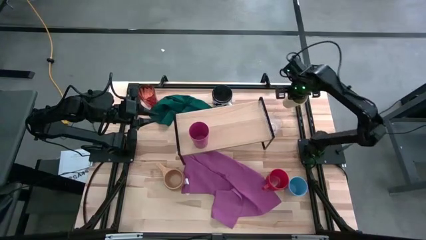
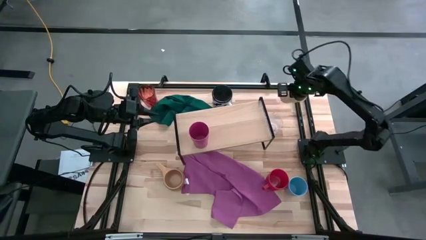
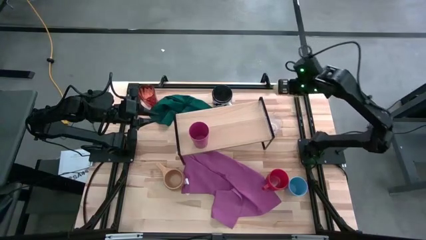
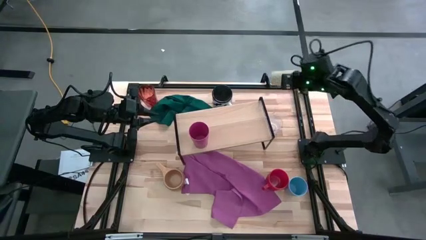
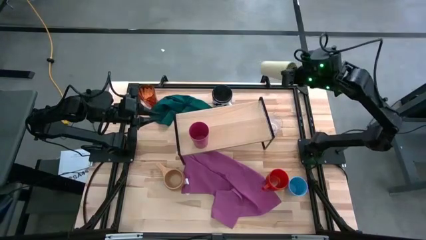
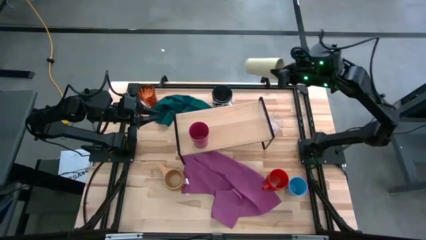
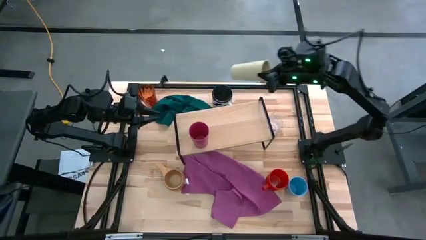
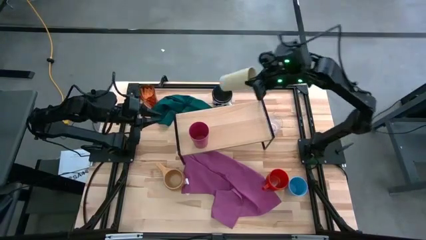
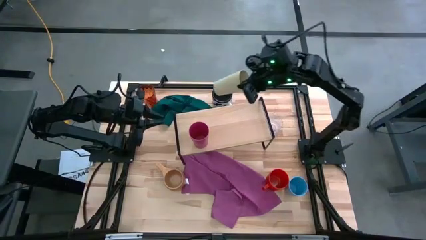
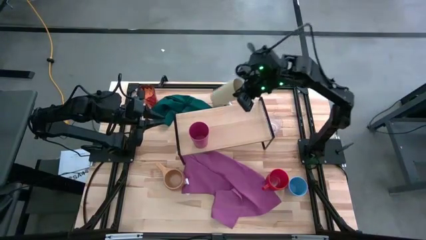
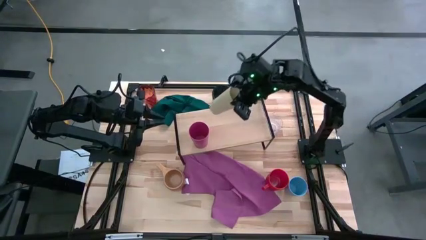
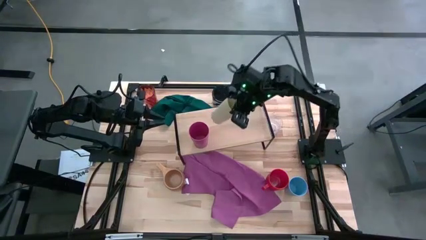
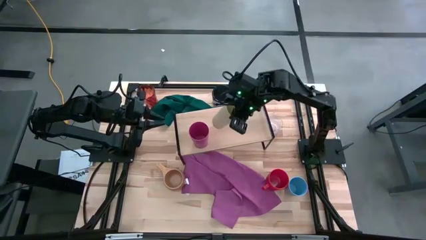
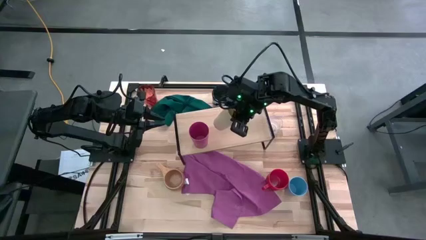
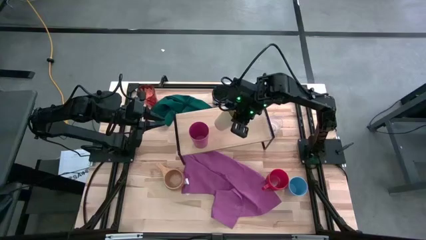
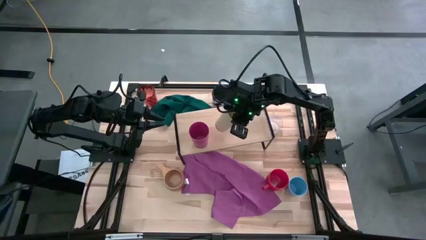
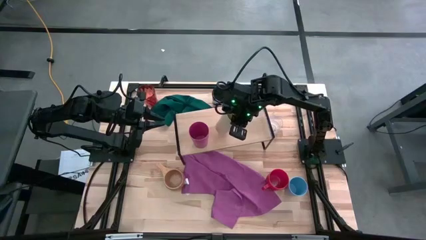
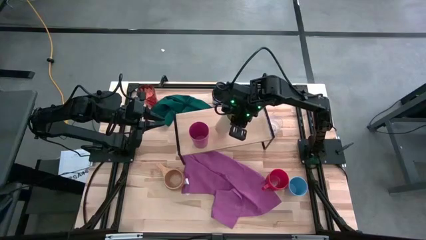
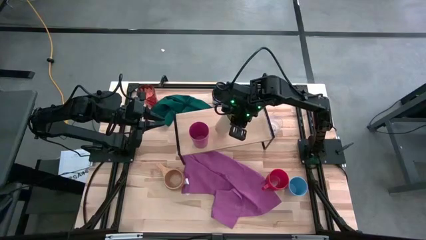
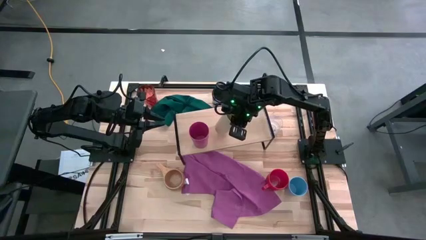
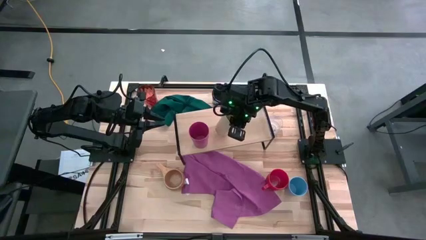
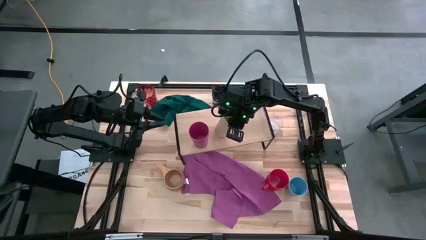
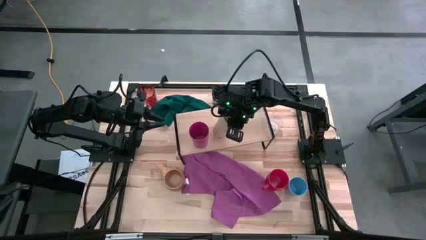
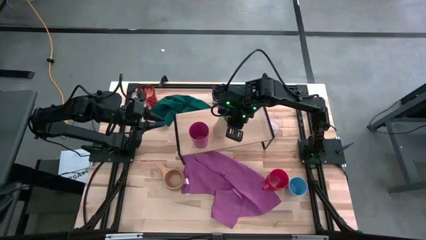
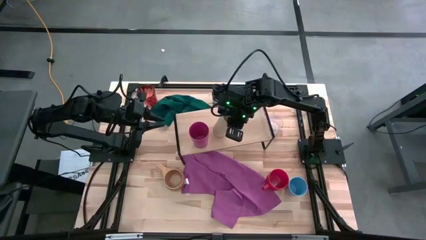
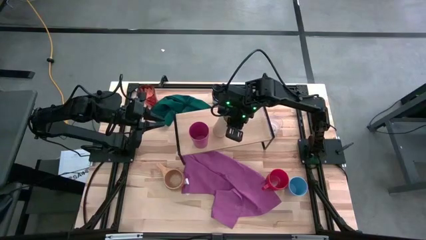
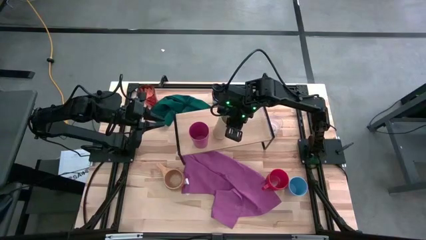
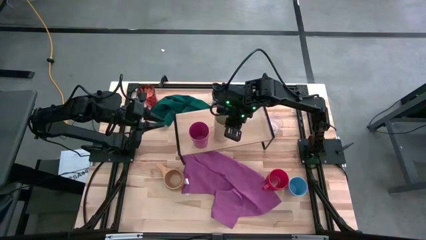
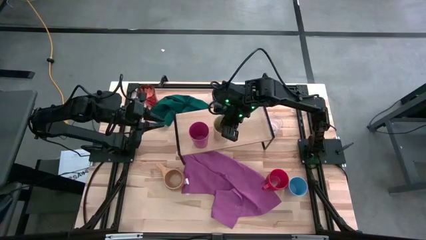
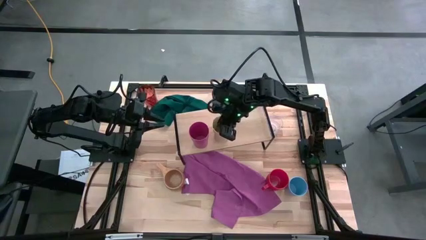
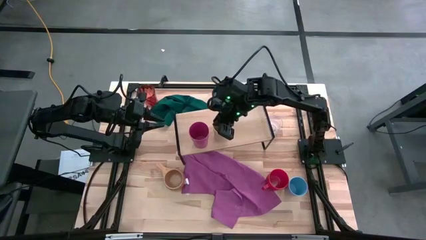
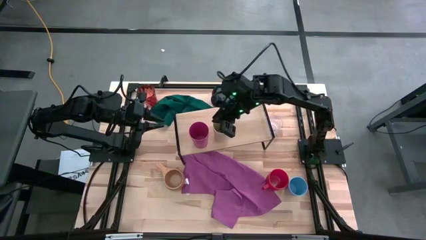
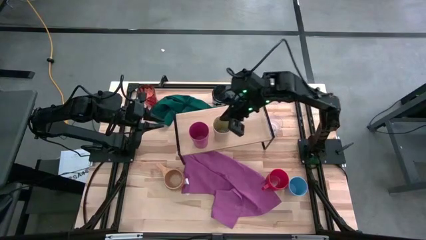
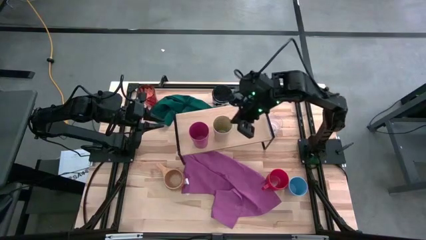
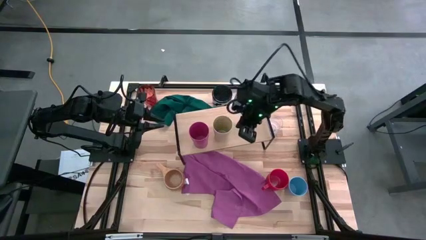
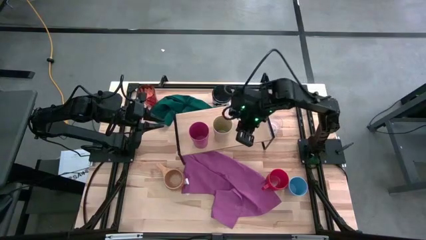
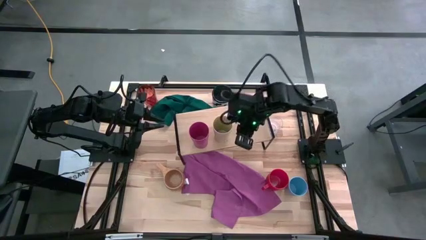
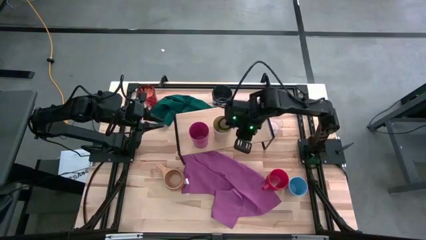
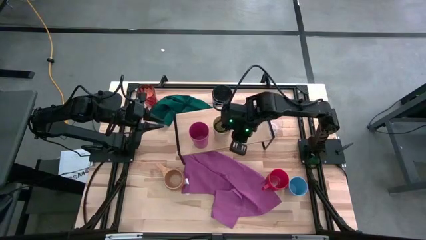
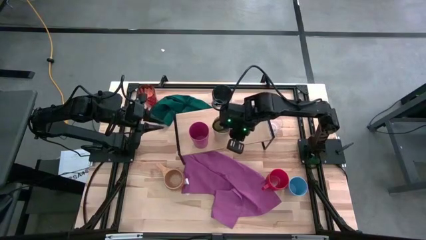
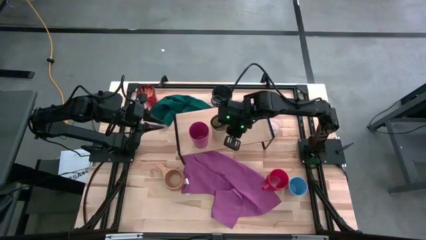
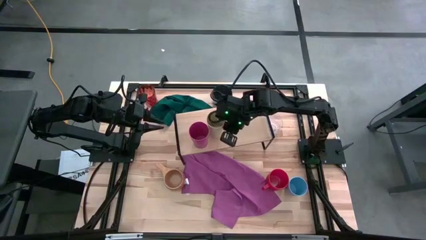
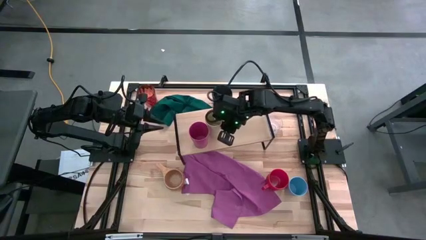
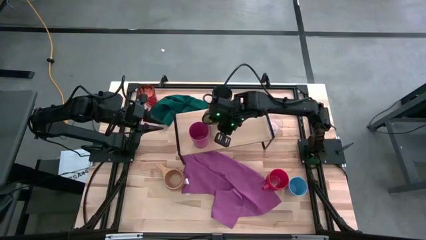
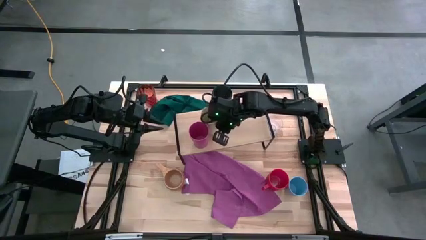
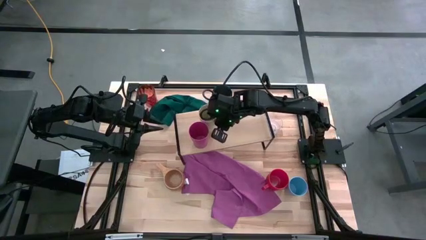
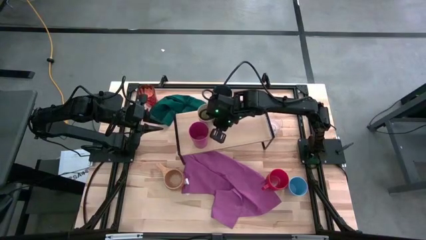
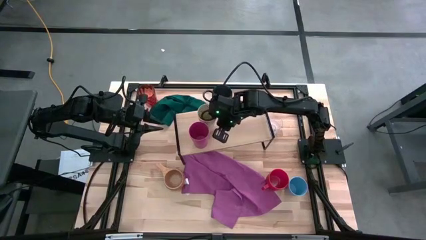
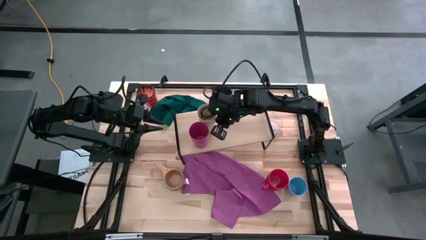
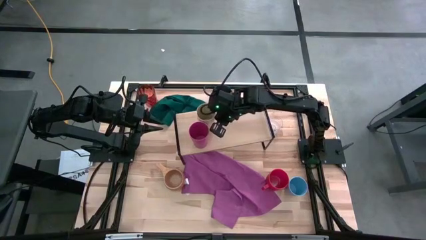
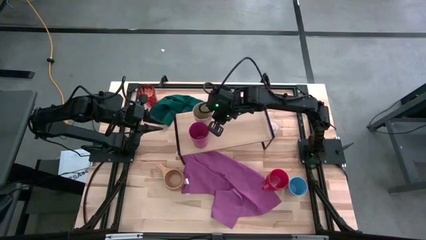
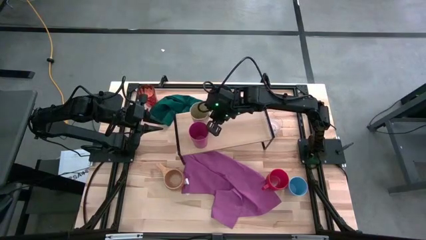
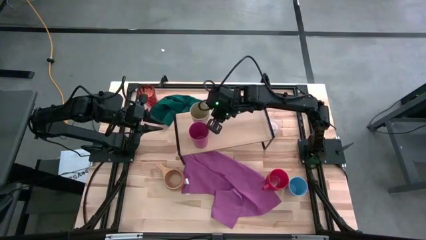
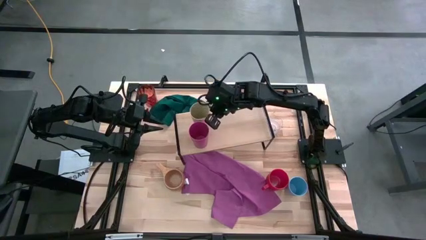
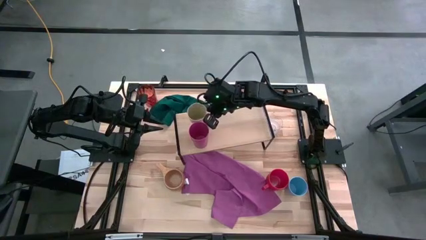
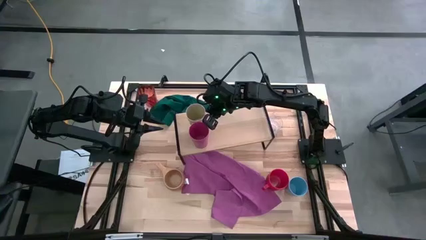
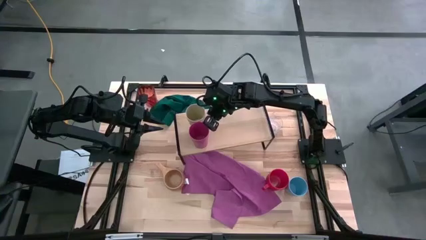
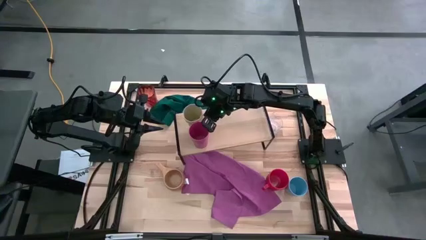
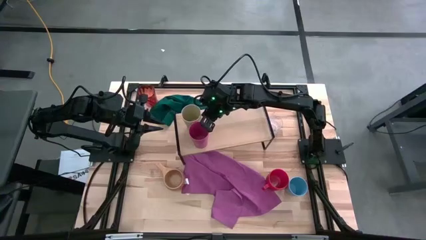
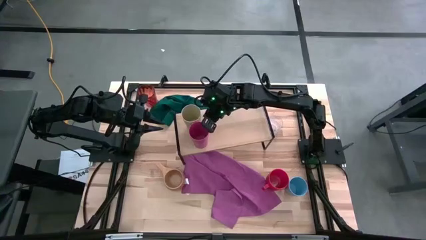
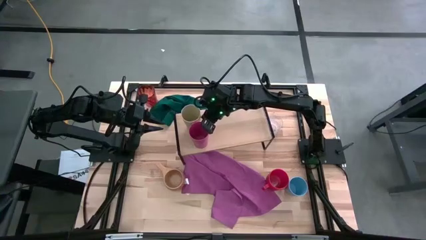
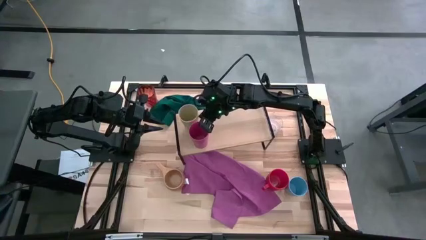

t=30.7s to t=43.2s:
Task: Stack small to large cups/mugs on shelf
Put the white cup on the shelf

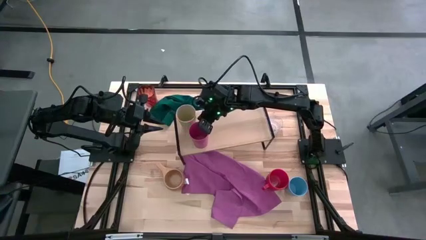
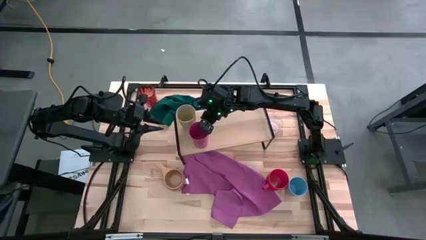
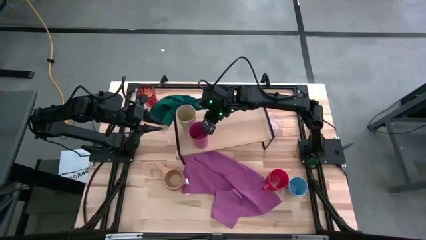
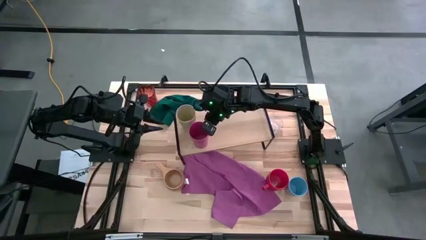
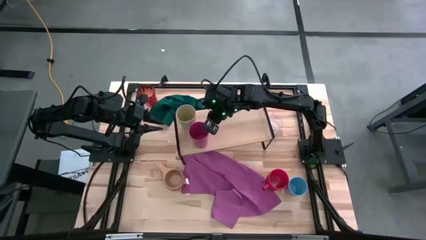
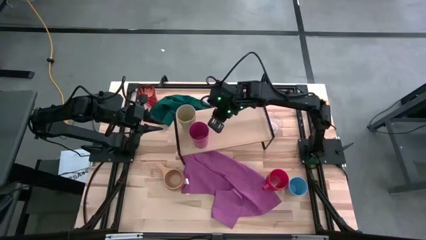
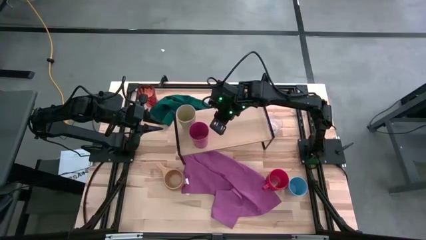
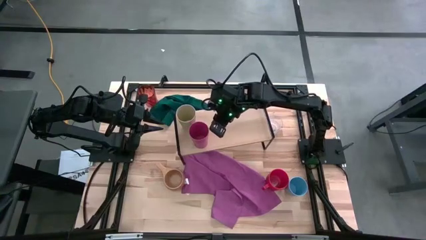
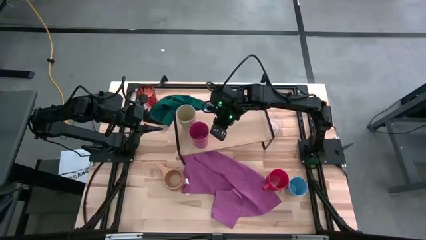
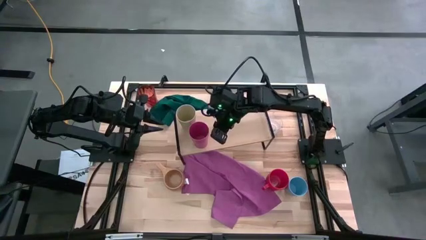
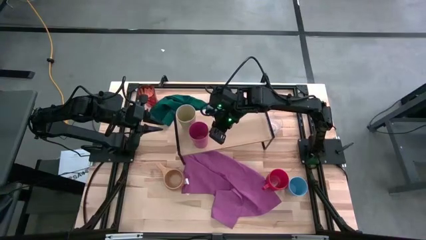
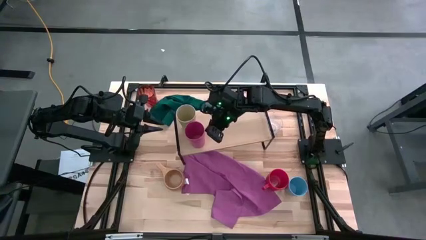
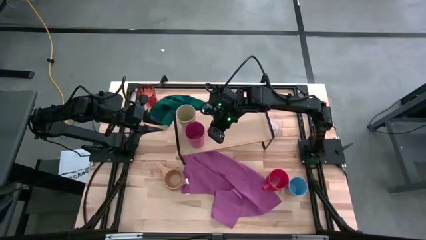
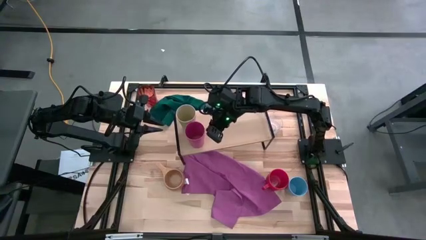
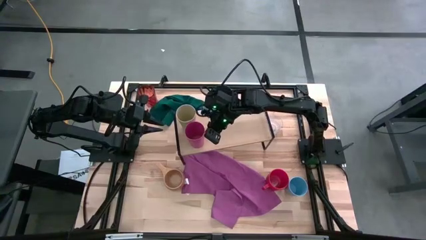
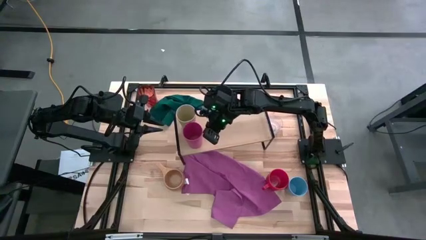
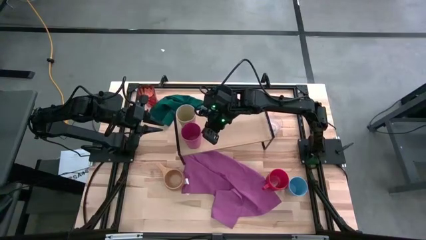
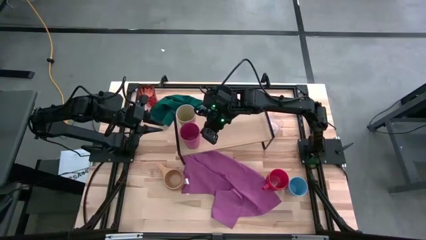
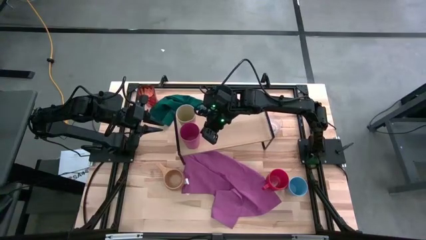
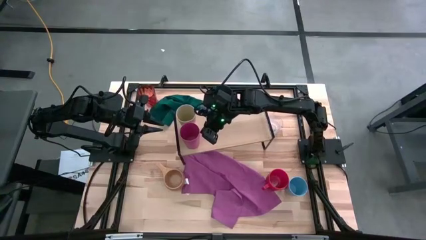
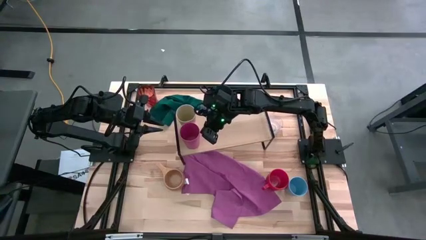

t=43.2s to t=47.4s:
Adjust the pink cup on the shelf
